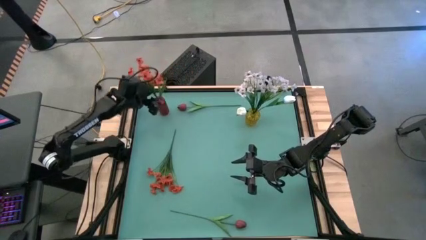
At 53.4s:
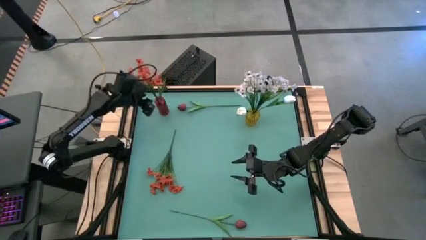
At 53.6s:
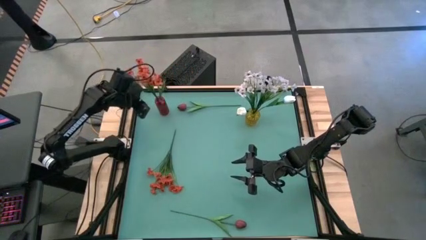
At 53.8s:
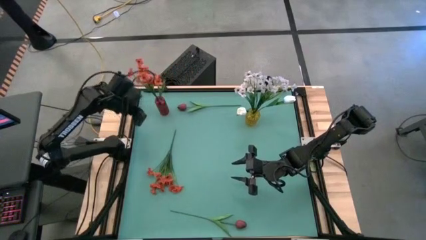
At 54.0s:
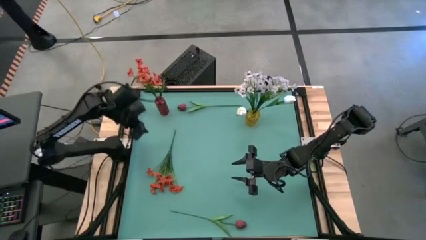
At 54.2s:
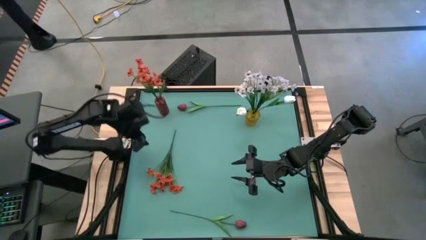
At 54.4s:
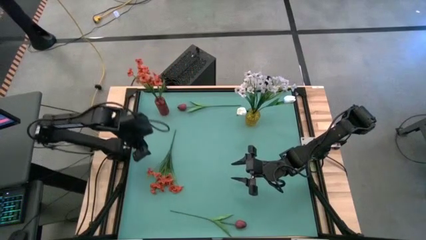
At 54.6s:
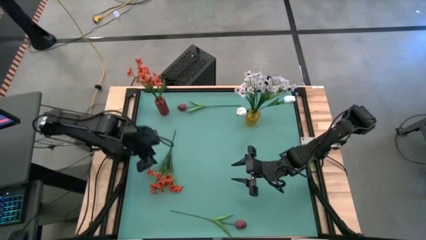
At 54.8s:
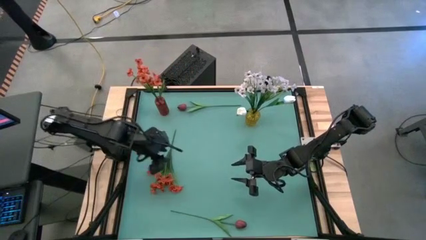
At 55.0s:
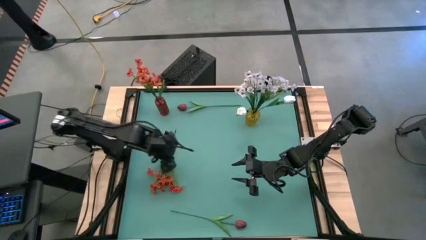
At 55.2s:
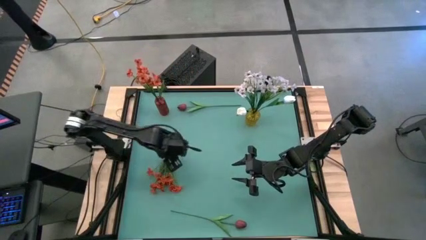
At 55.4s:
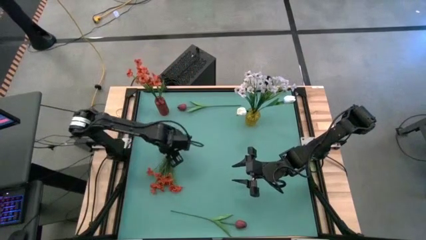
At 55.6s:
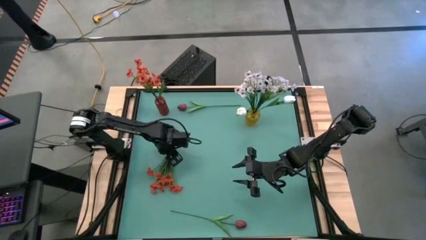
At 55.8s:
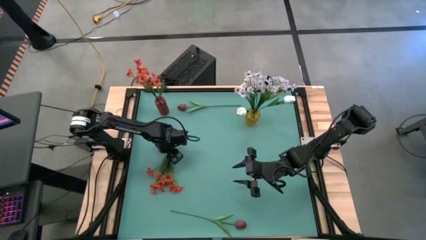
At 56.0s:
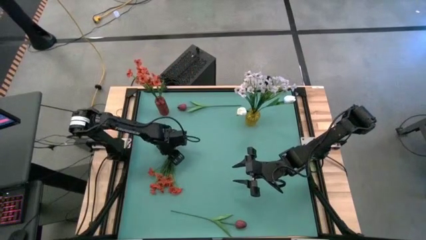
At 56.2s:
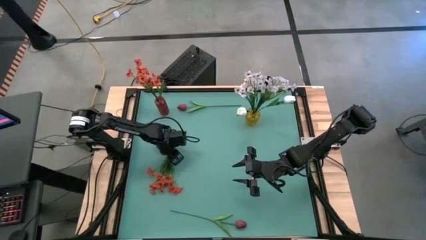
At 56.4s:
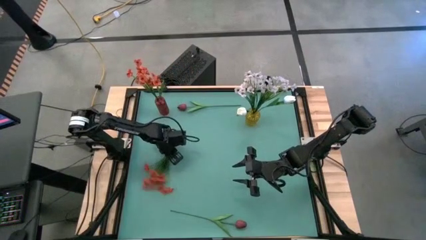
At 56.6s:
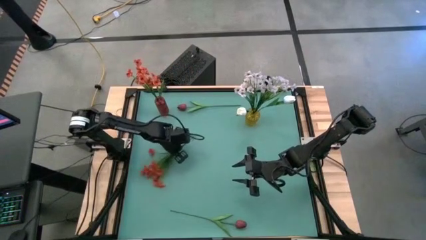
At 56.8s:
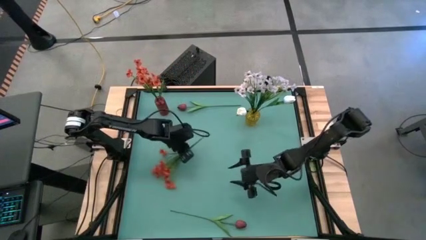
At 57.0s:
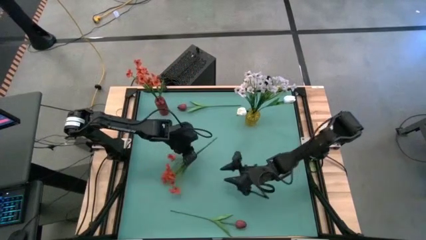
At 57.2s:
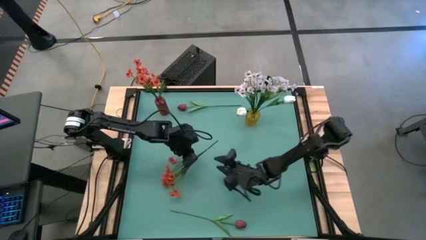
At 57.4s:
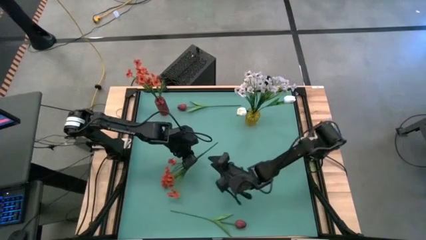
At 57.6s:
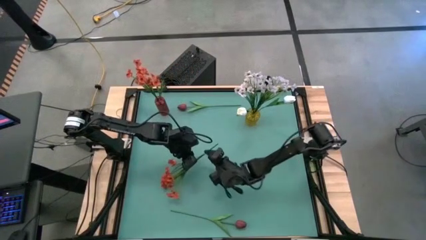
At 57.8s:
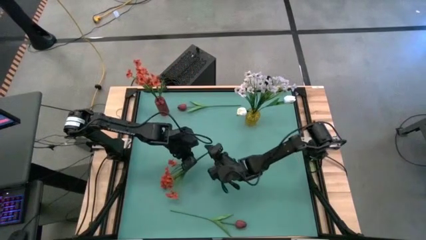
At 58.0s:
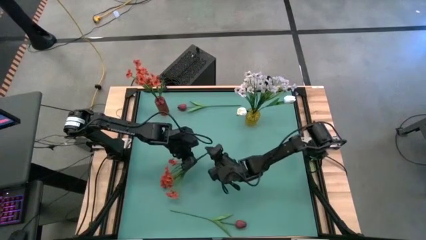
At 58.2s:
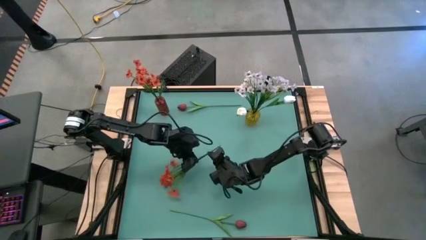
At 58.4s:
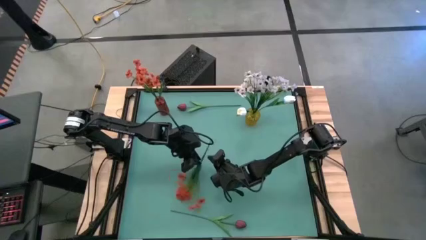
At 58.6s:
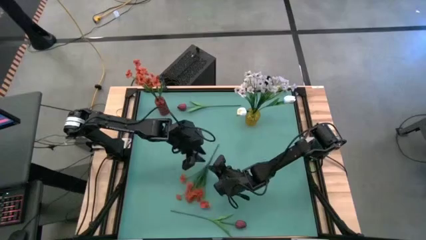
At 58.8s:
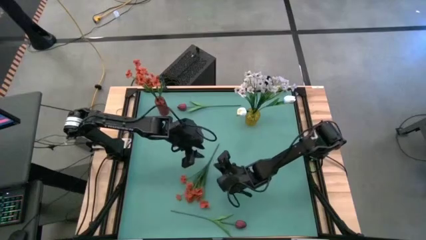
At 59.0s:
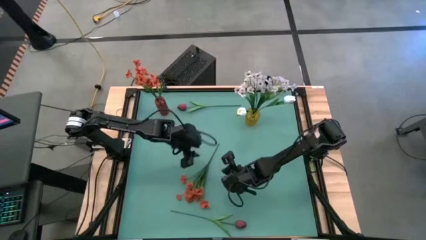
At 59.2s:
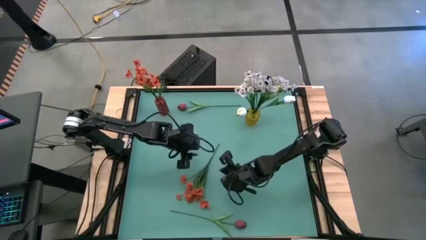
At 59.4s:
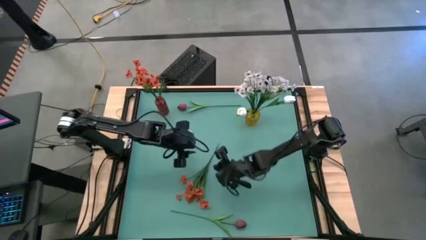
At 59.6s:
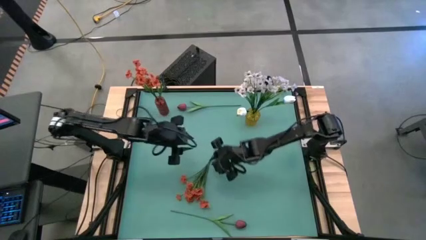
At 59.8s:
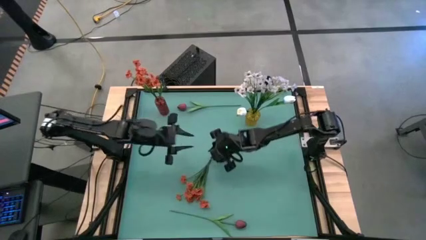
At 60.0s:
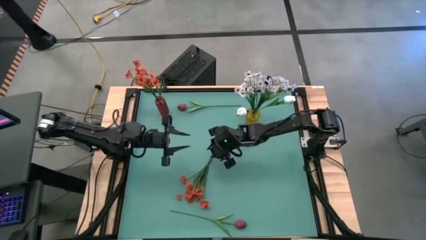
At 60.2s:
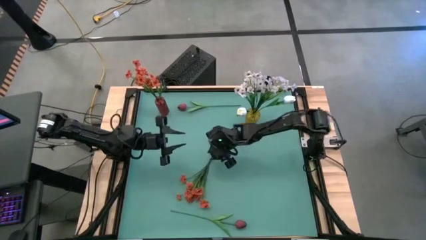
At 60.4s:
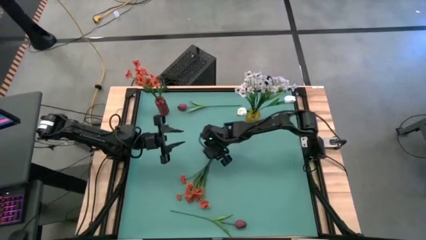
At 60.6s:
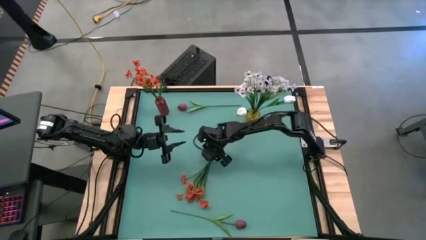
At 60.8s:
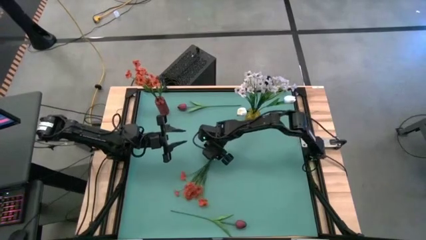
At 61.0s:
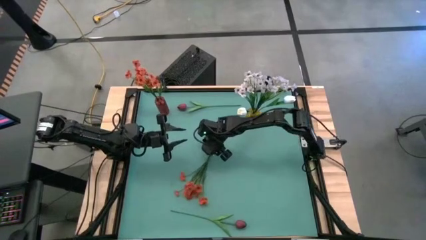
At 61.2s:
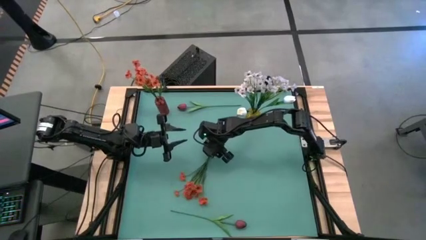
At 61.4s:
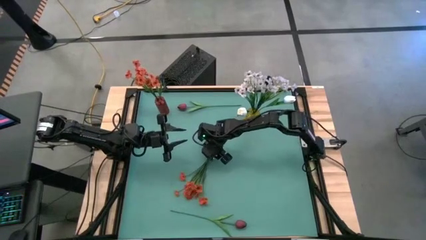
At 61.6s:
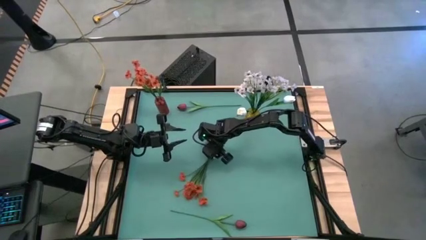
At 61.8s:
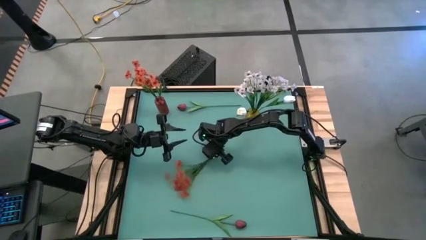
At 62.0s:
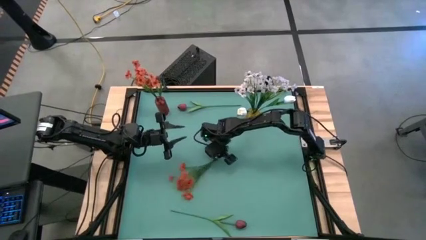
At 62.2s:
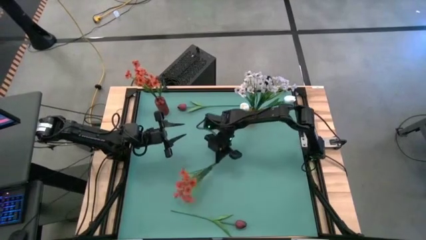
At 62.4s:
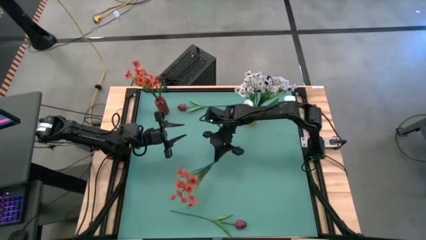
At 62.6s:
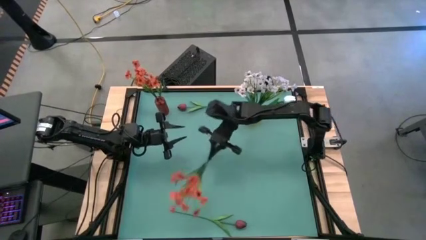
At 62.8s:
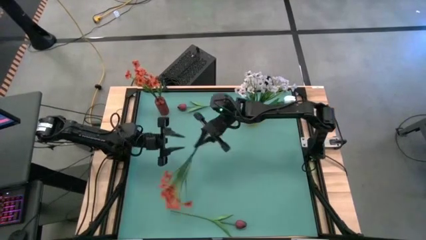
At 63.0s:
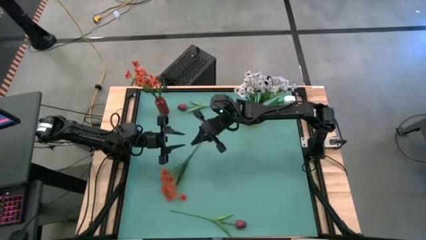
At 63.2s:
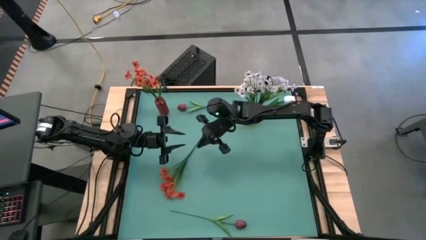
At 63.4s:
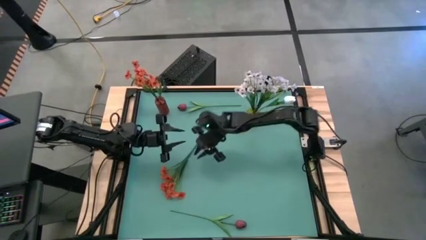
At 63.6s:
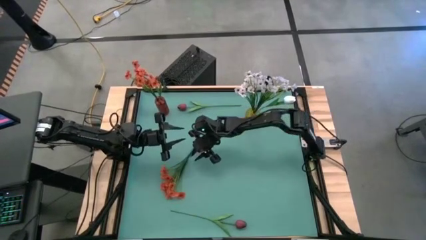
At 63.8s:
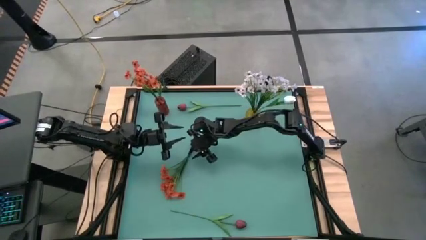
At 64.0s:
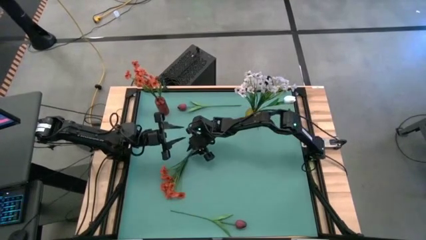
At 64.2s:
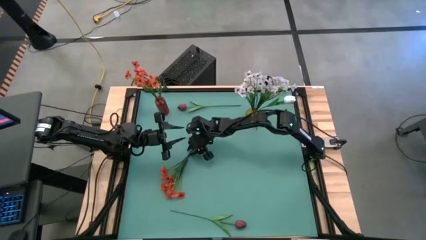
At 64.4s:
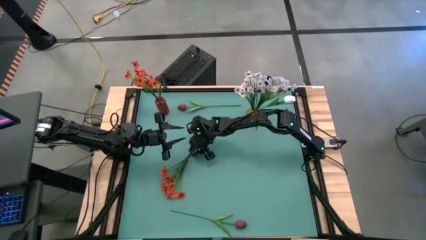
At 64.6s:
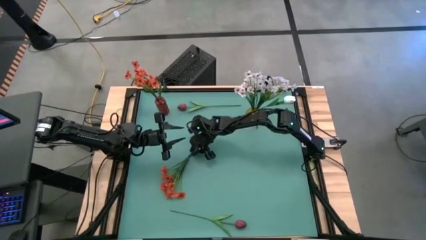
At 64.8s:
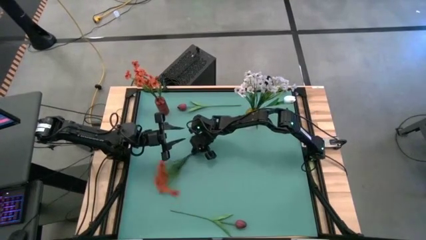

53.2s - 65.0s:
Task: Sort flowers into vase by color
Put the orange flowers into the red flower vase

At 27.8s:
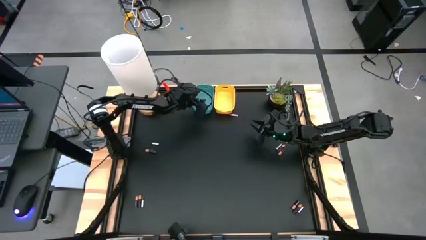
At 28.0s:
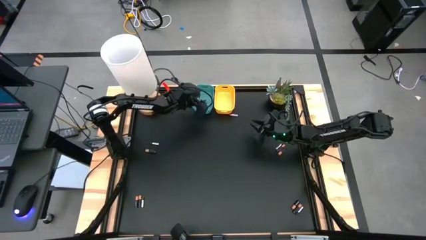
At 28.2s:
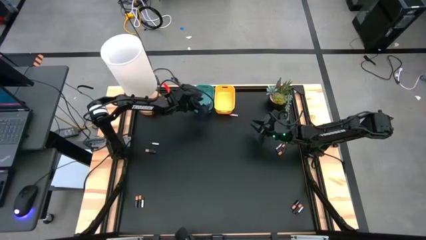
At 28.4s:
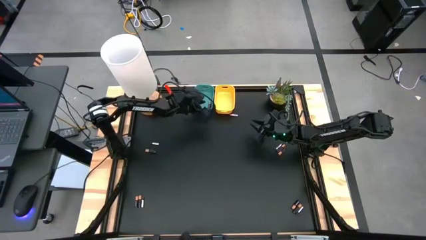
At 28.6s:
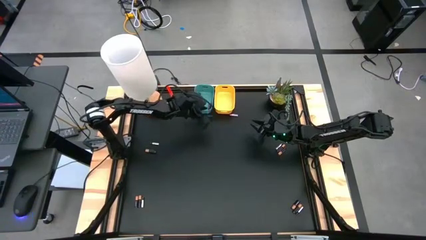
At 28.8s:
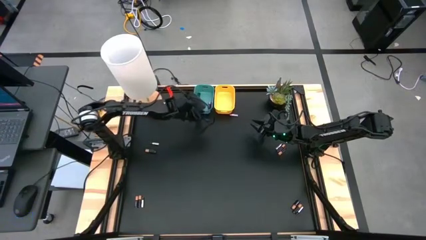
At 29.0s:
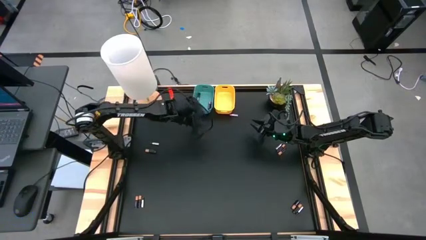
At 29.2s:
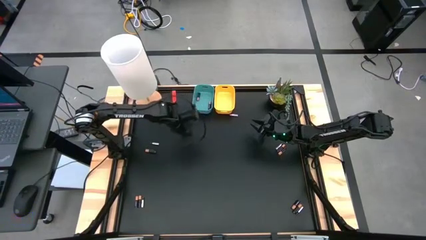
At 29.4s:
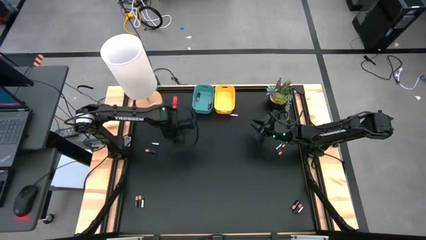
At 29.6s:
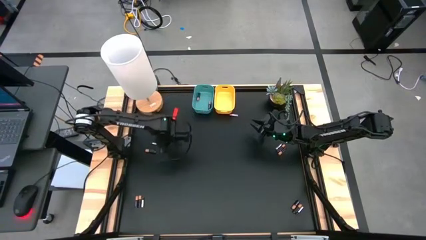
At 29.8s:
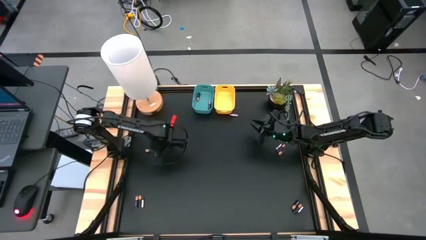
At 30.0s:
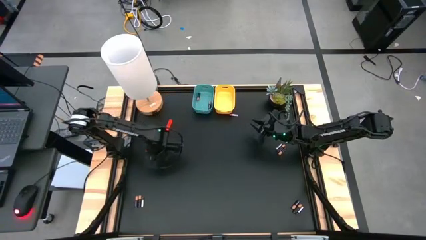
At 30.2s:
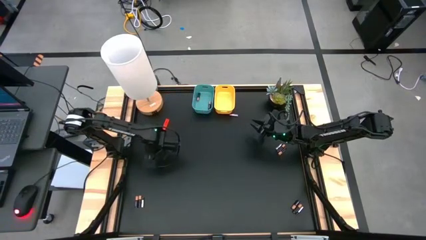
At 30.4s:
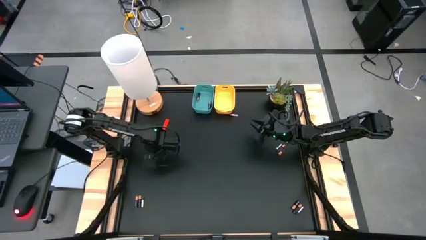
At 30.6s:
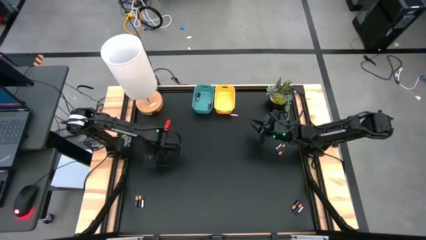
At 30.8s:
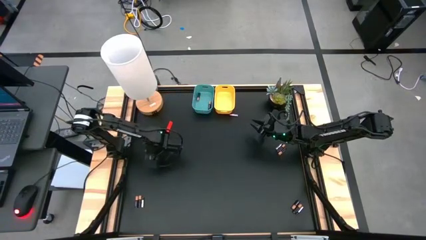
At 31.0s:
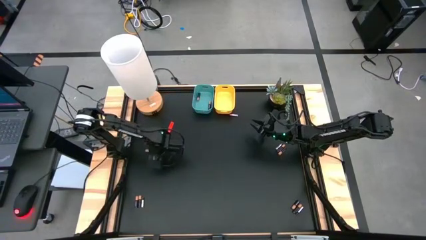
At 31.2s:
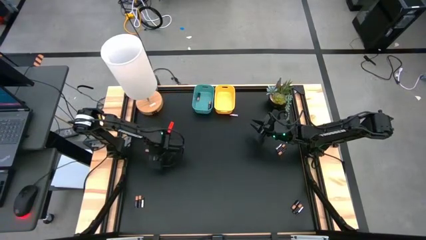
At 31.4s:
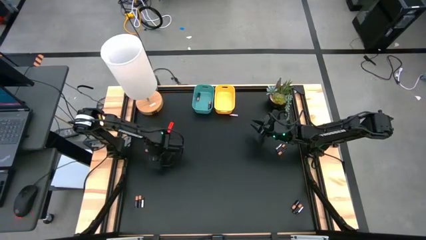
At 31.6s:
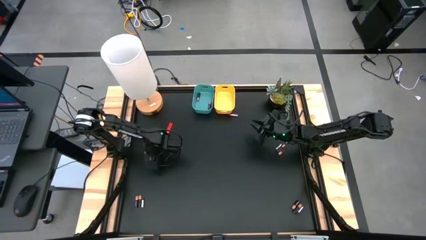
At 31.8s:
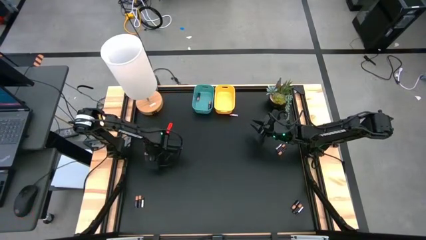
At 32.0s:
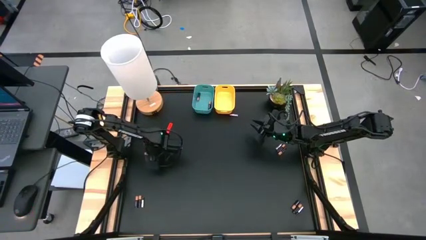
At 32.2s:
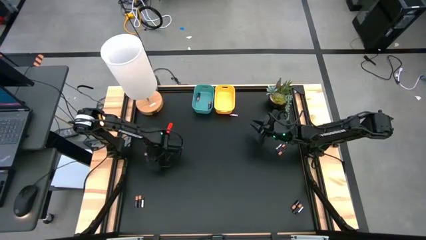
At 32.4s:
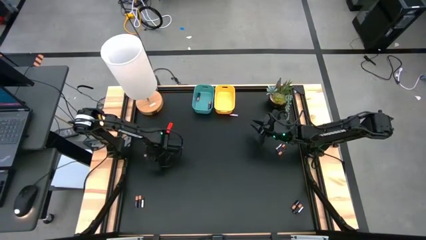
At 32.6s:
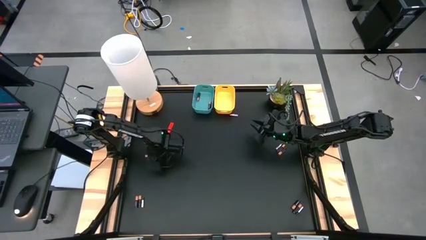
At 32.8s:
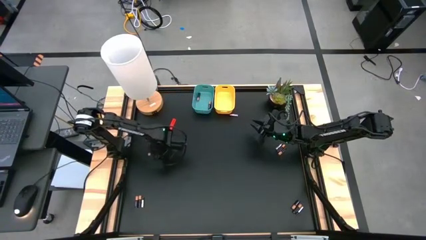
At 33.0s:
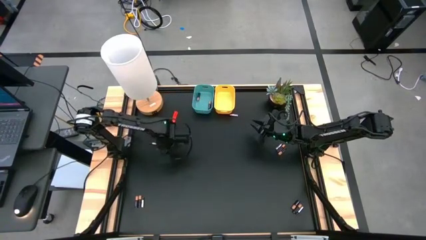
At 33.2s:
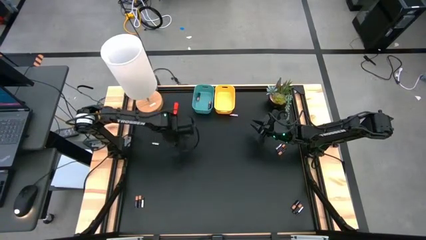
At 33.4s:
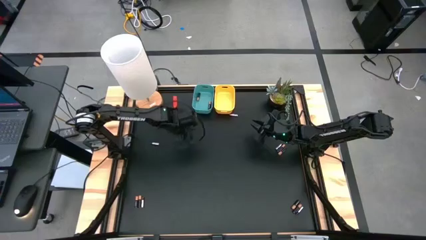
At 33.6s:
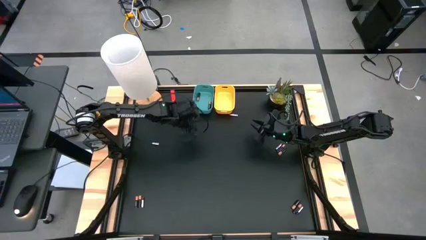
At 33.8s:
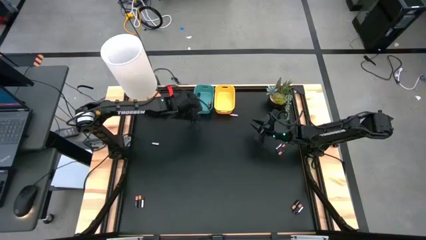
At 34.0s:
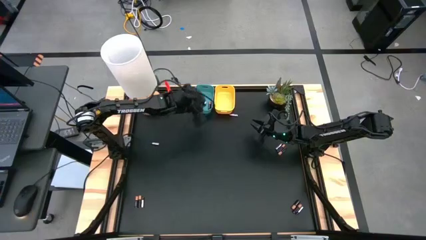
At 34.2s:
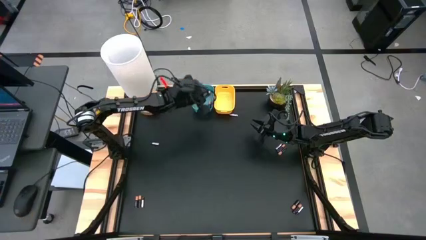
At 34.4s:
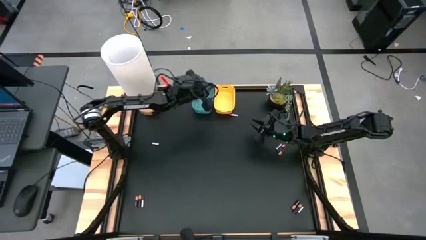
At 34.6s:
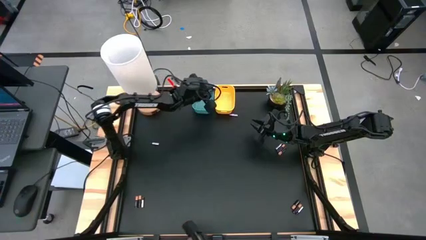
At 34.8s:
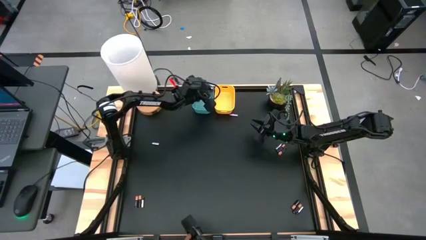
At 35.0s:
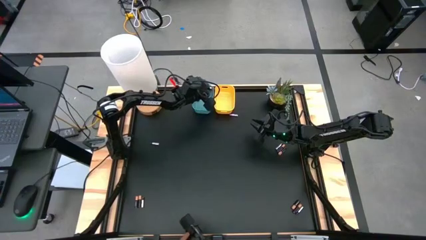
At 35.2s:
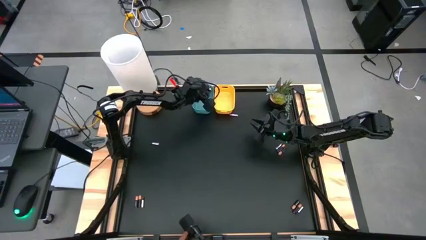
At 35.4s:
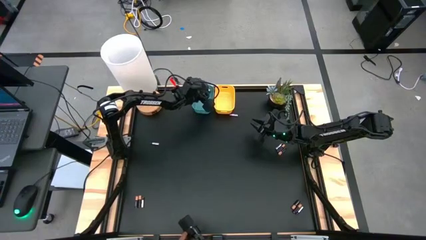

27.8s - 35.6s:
Task: Sort batteries
Put the gold black battery into the blue bin
